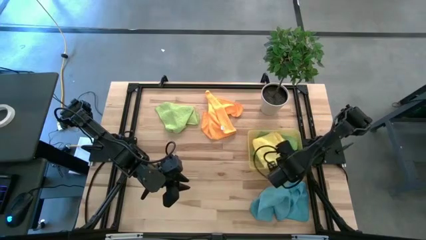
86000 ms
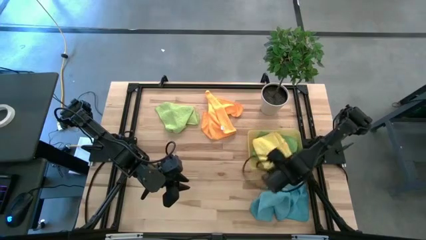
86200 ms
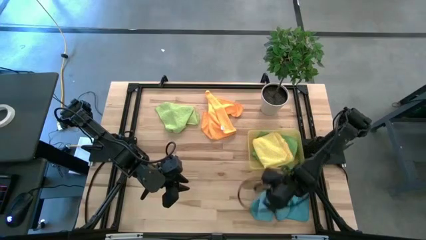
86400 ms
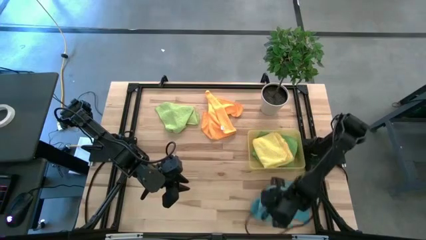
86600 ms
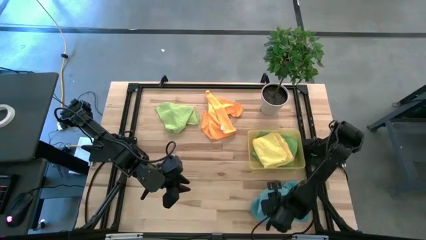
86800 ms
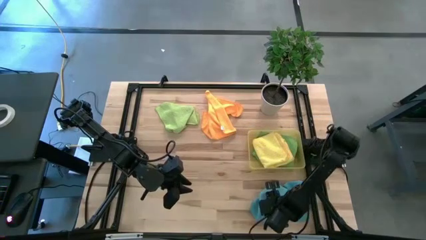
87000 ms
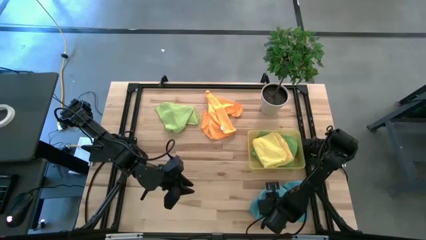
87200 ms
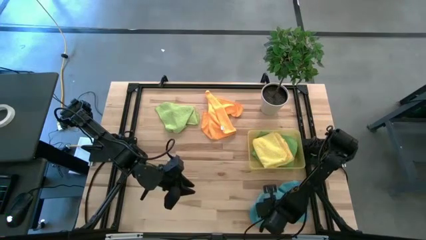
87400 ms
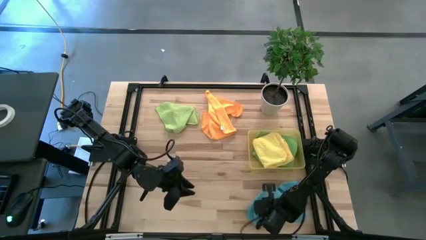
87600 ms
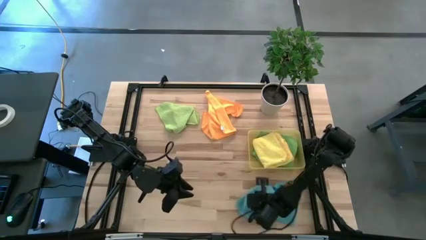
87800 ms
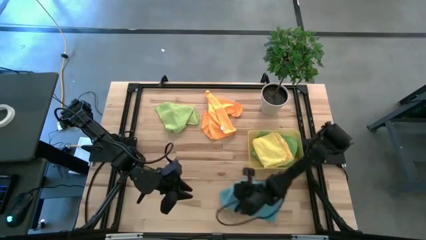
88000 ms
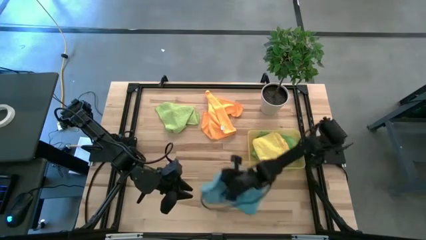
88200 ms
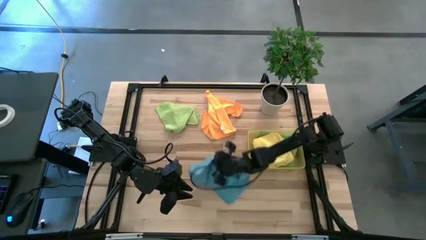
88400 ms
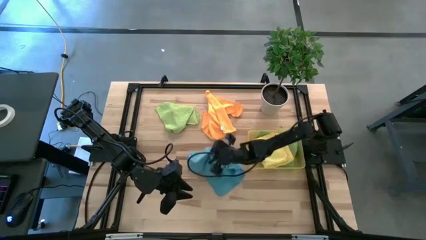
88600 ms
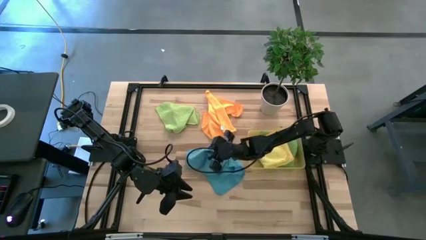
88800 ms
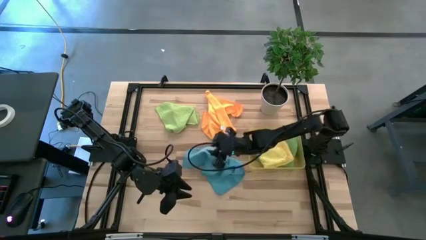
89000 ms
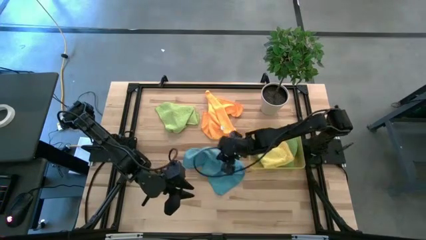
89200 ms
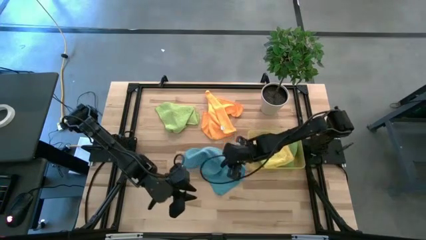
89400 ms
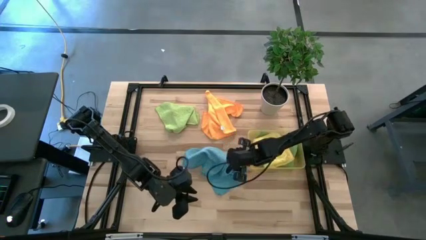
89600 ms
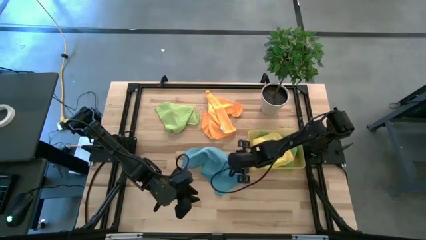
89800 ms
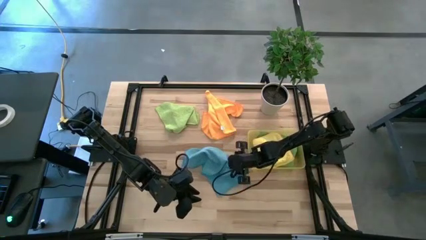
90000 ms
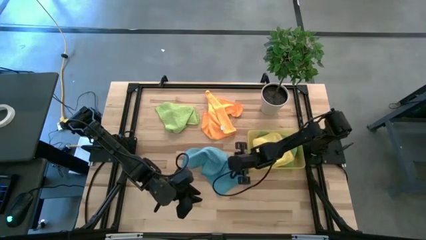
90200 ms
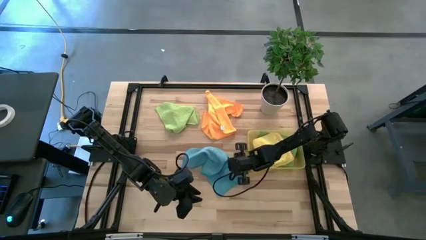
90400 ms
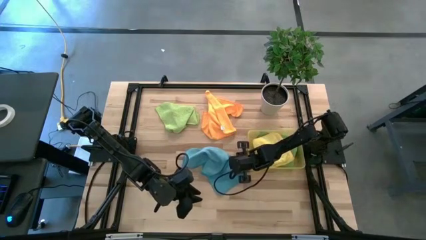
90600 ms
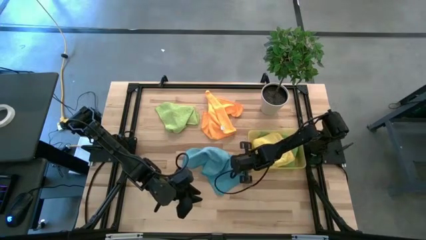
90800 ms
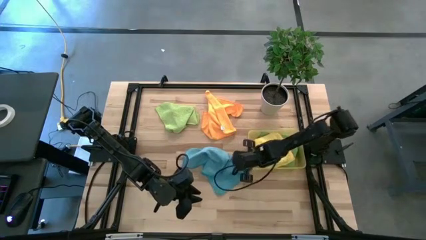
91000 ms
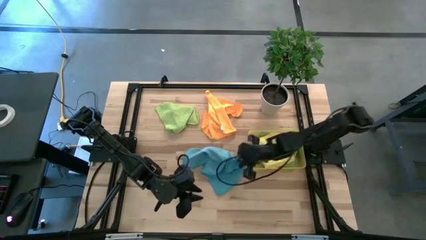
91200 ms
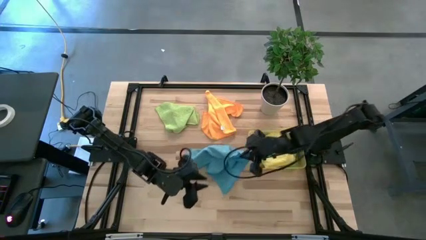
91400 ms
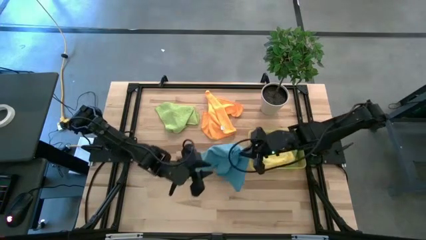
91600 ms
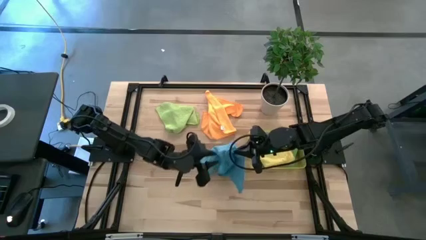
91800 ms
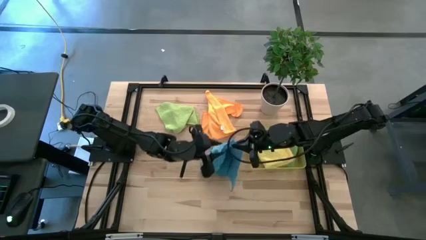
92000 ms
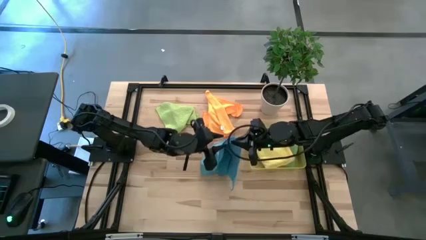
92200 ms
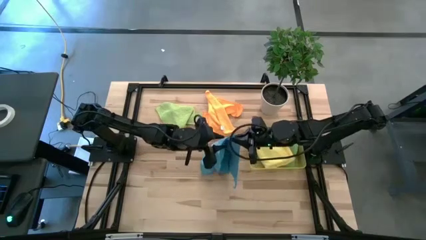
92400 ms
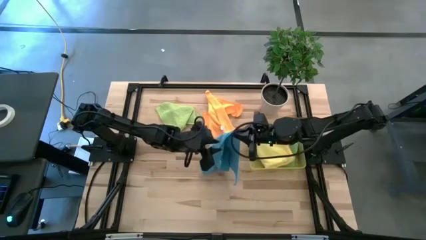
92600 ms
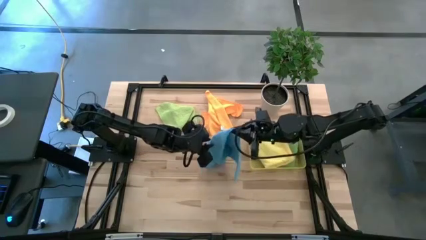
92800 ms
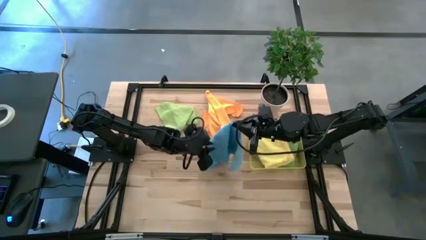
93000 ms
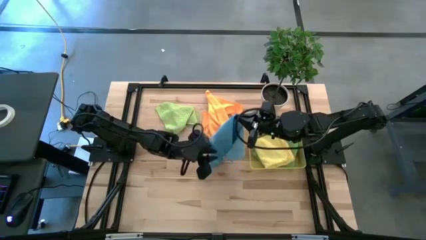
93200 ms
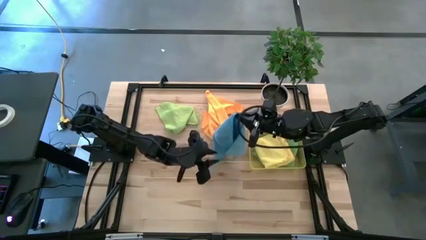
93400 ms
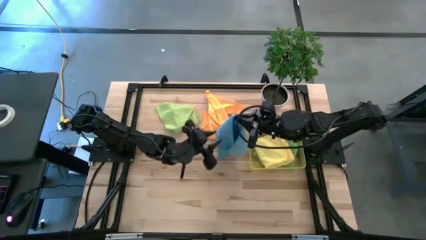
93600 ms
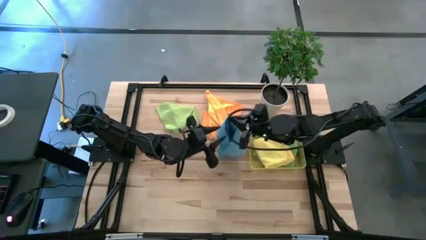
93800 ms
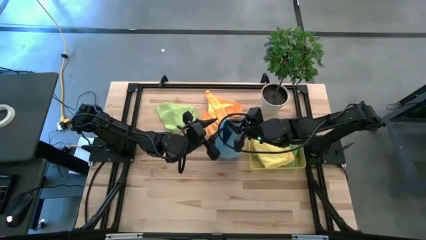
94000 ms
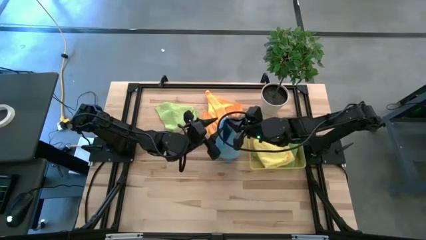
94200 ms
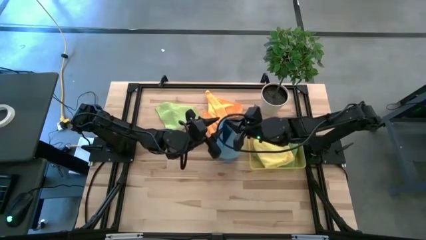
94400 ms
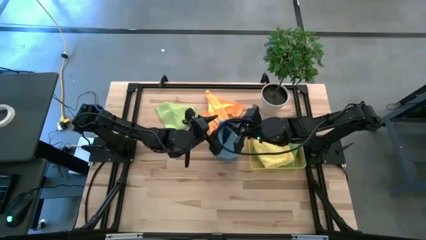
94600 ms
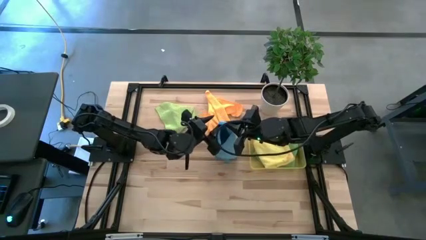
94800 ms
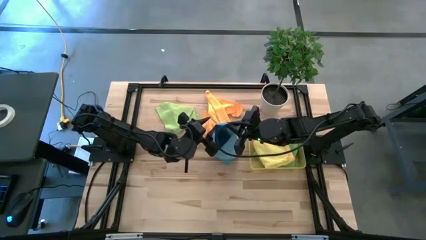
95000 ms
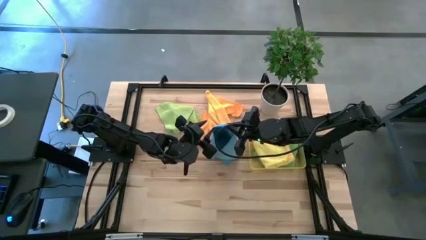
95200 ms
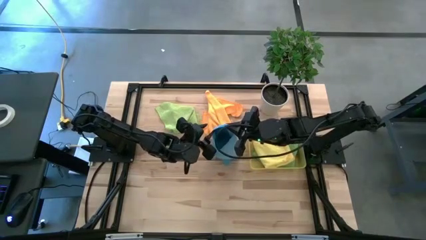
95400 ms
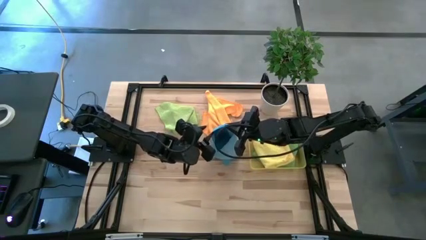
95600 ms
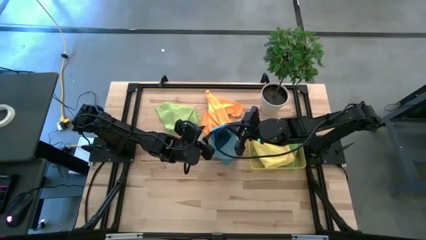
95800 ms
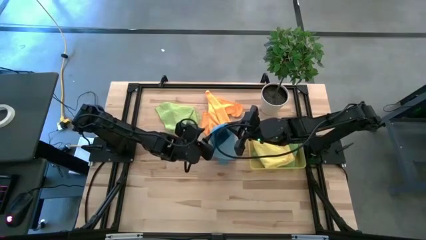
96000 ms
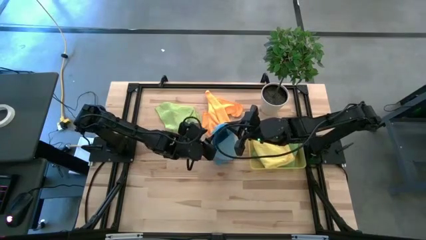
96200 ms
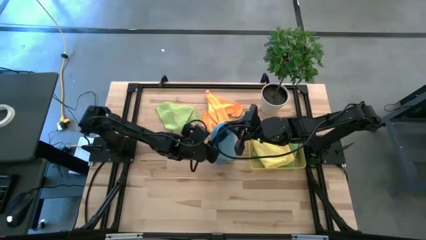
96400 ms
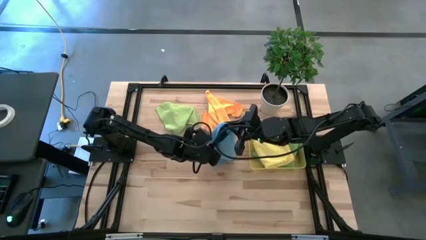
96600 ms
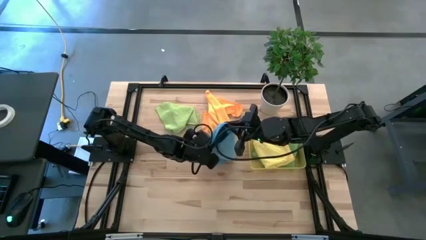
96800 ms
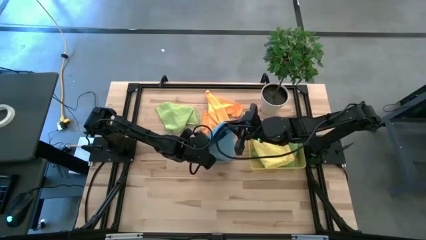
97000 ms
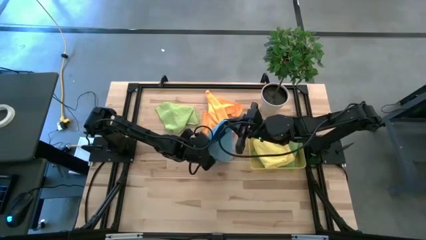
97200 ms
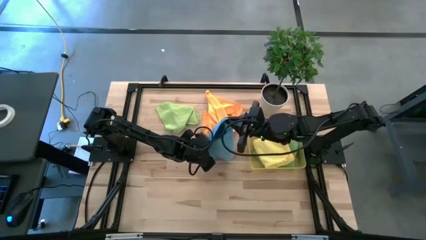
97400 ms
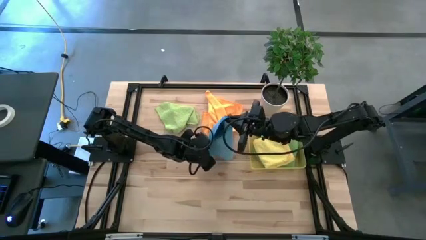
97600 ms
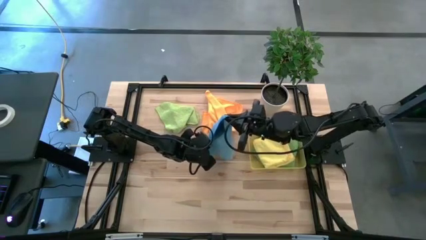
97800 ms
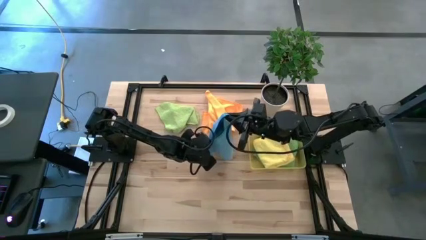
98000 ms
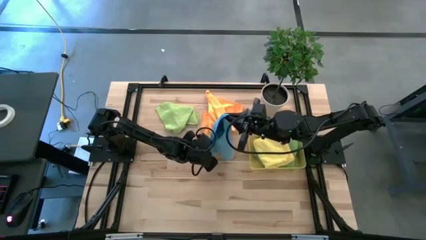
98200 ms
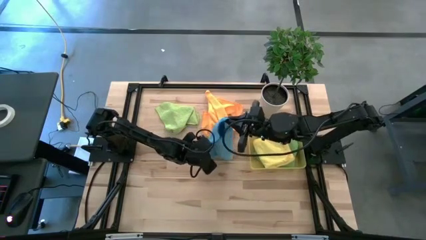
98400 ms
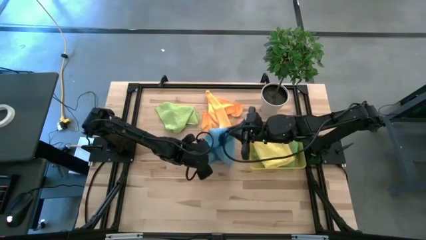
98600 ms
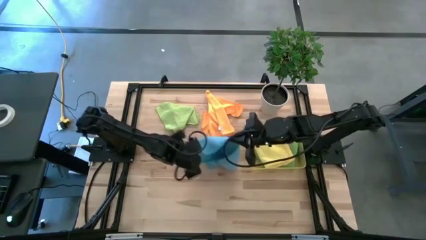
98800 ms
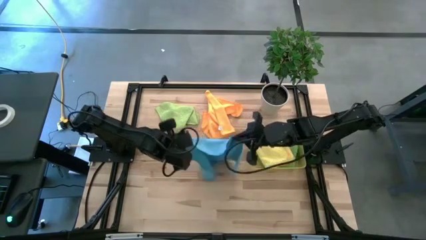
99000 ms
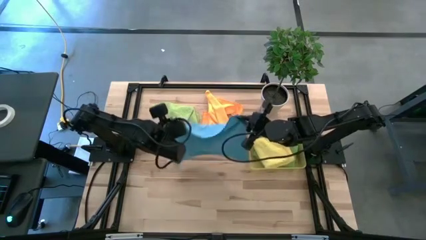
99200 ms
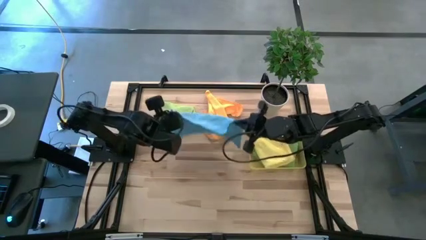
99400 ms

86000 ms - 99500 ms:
Task: Fold microfiber towels
Fold the blue microfiber cloth
